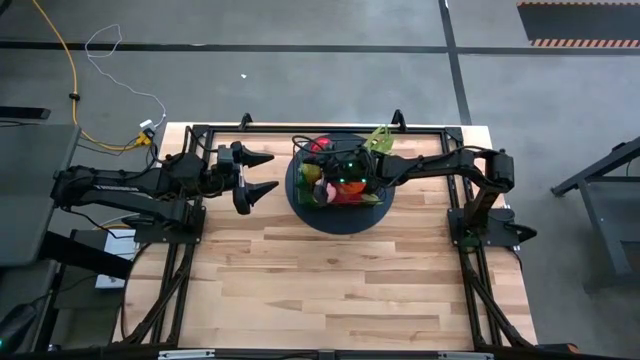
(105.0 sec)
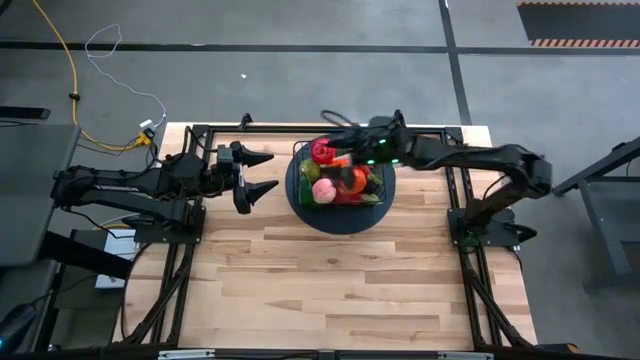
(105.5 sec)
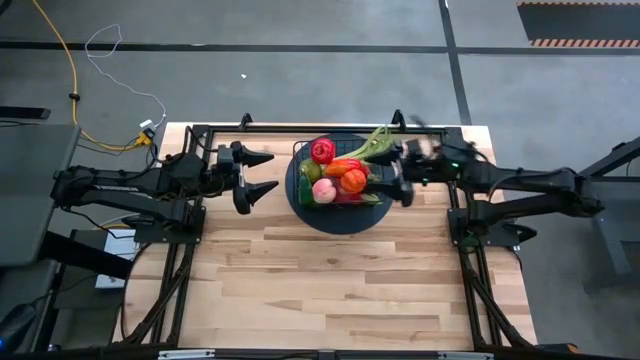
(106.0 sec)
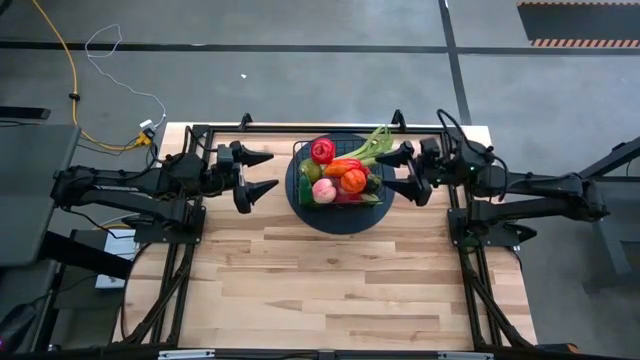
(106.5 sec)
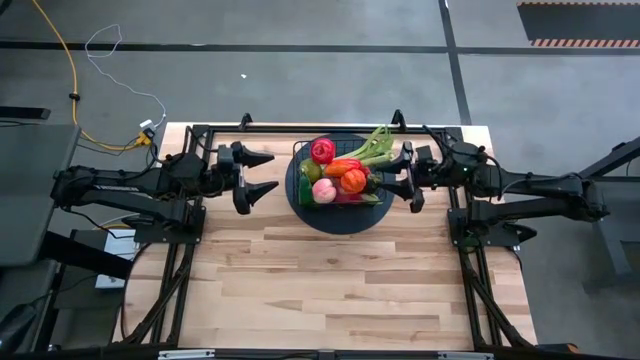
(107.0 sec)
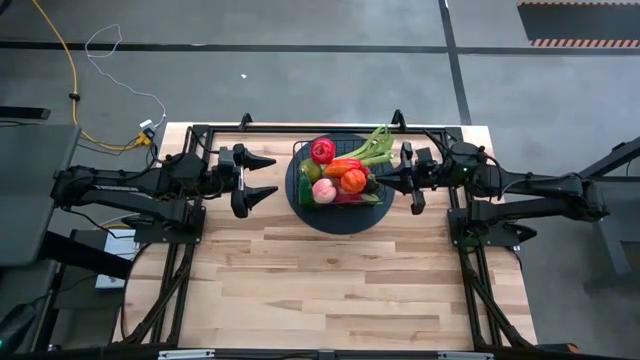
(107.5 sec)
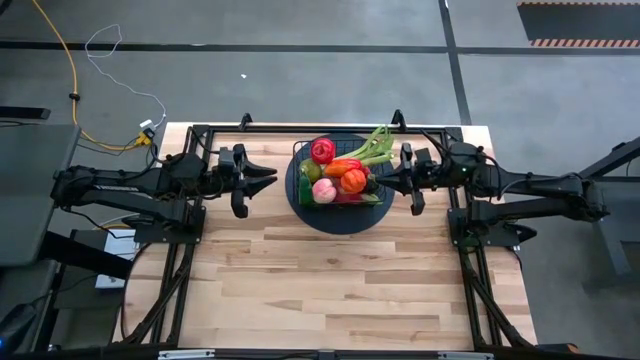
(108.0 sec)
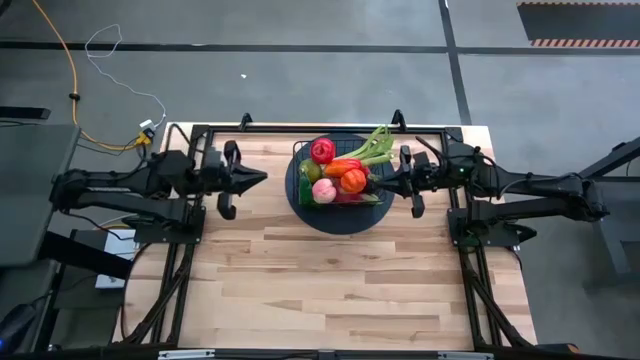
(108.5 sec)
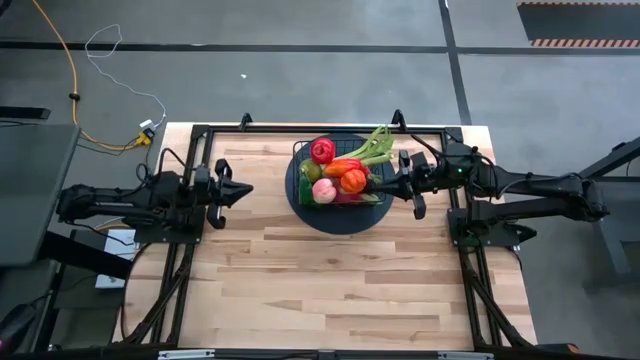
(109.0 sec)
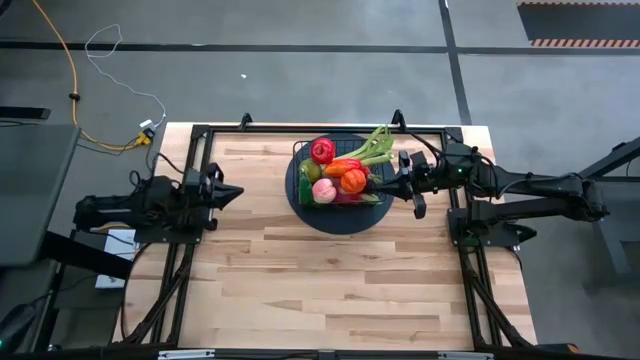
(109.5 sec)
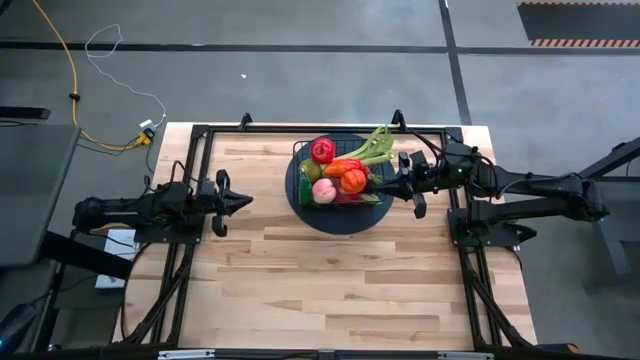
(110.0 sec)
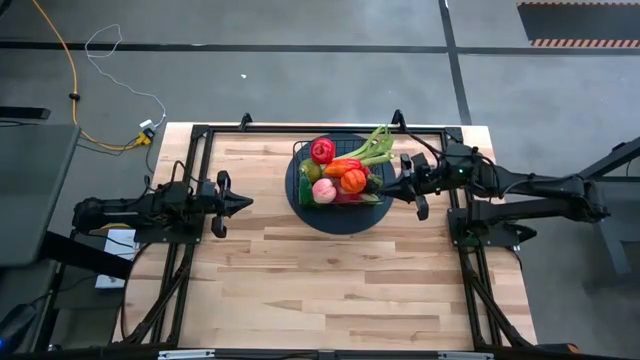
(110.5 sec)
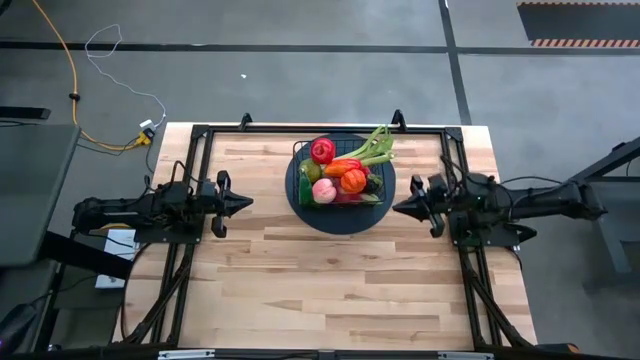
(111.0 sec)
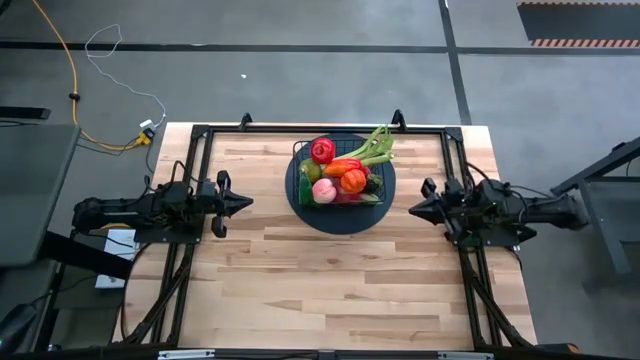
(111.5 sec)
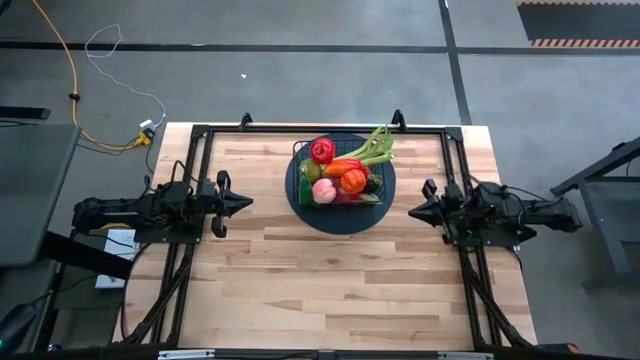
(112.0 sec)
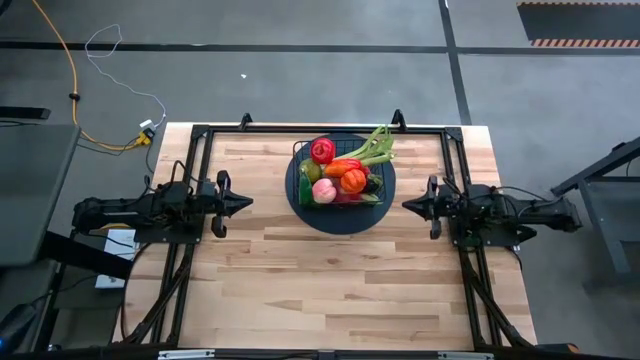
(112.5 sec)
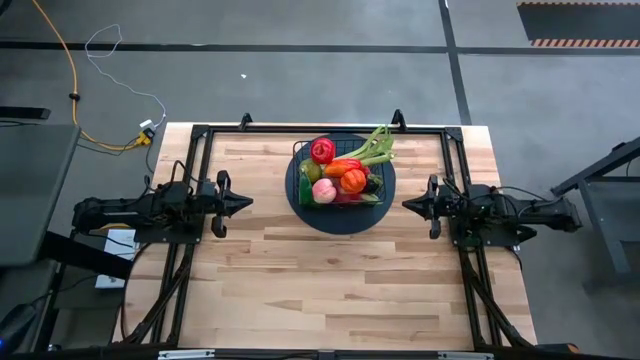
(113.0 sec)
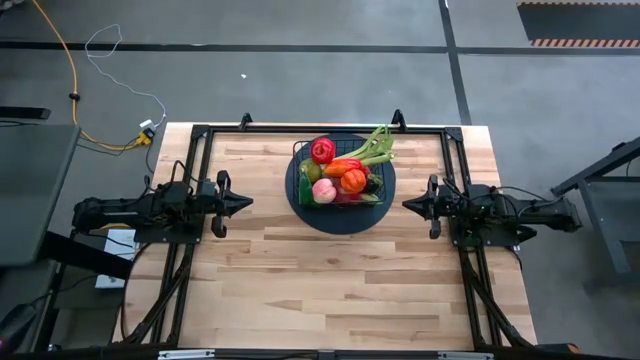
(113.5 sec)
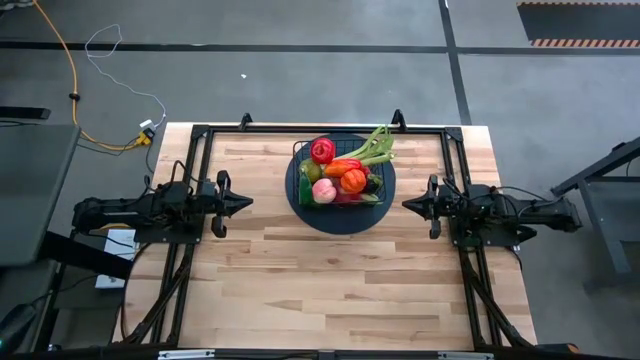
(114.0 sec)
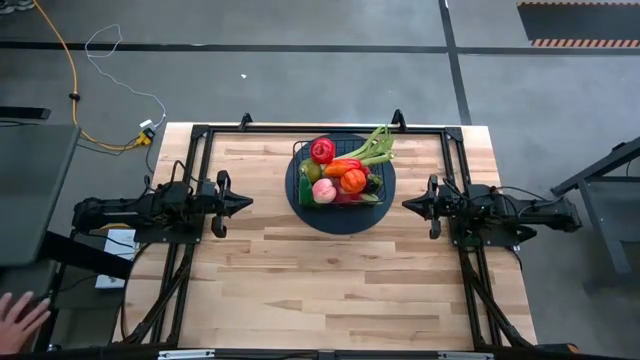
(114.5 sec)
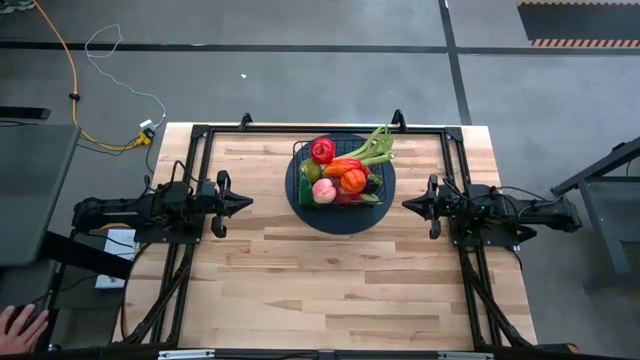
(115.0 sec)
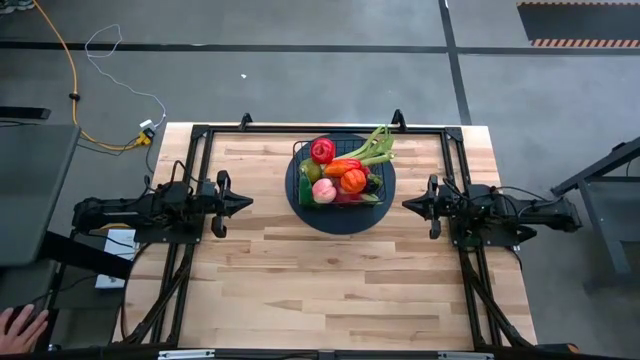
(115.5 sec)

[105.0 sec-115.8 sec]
Task: Build produce basket
Return to home position

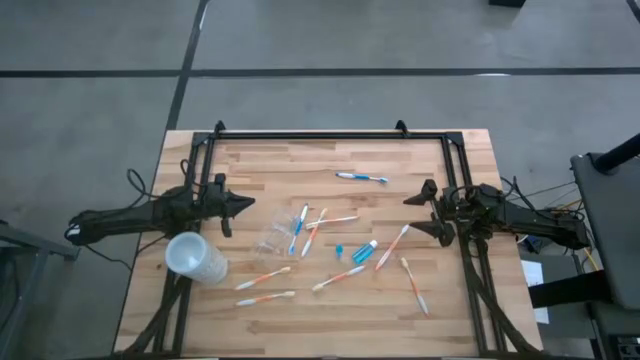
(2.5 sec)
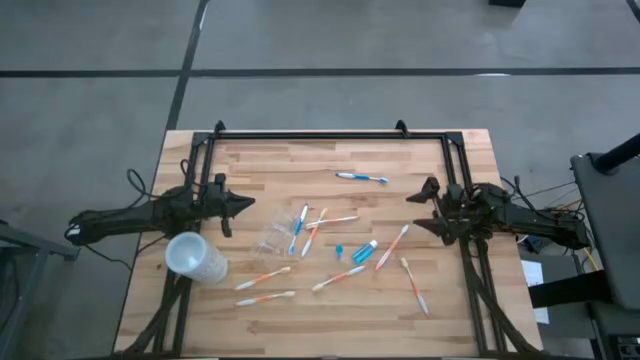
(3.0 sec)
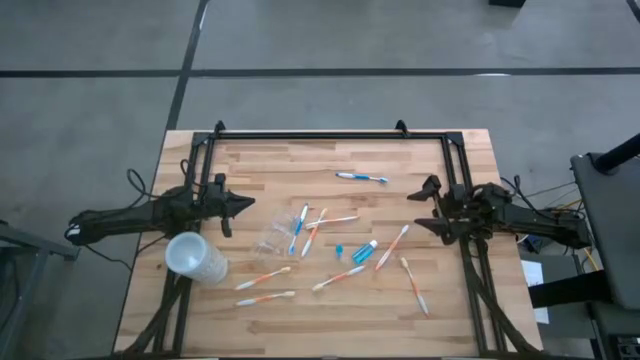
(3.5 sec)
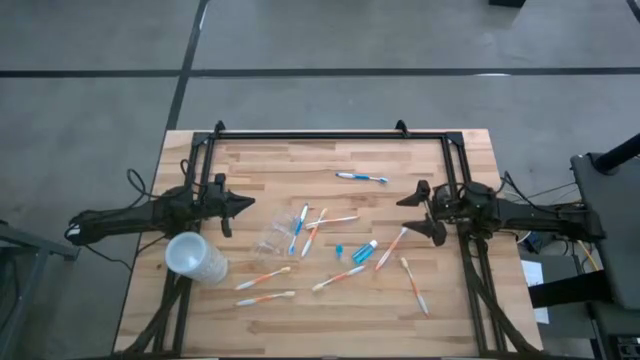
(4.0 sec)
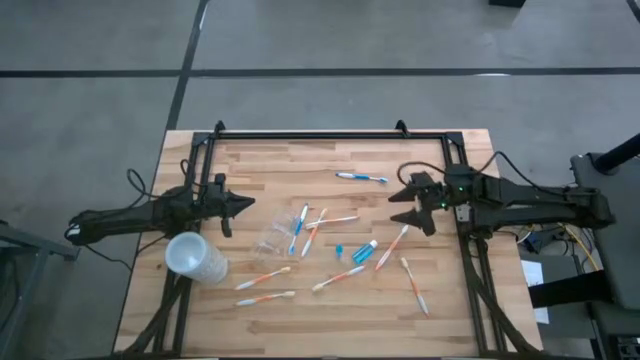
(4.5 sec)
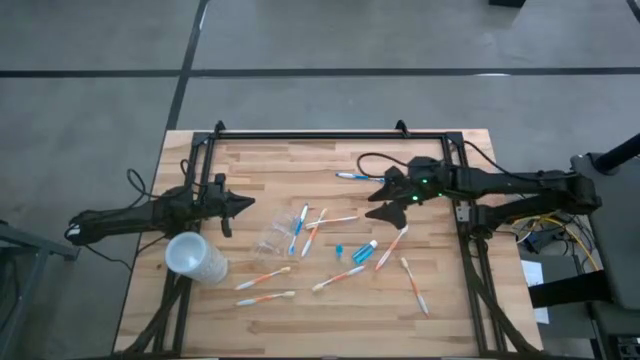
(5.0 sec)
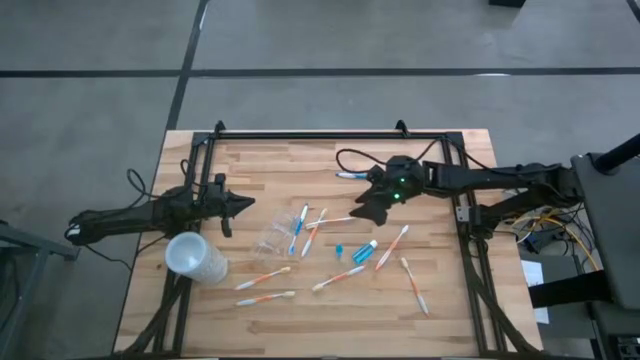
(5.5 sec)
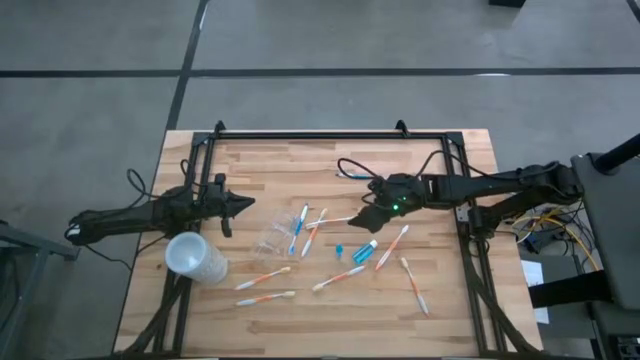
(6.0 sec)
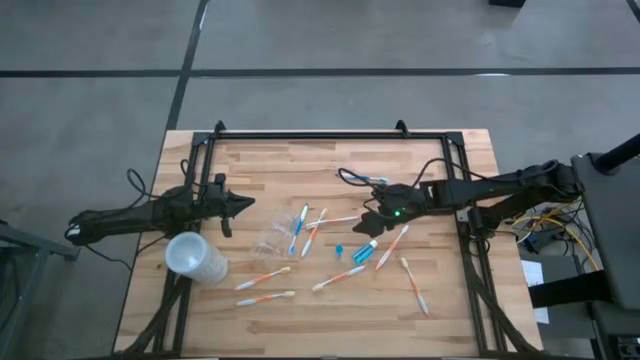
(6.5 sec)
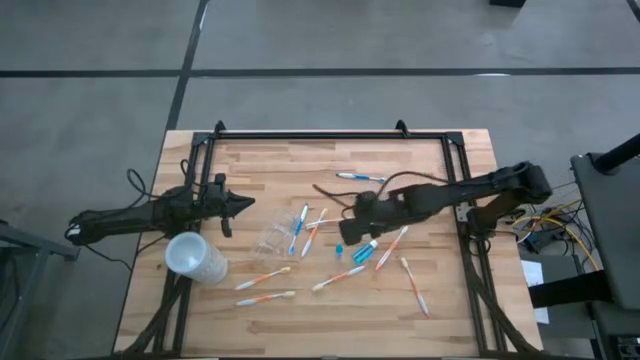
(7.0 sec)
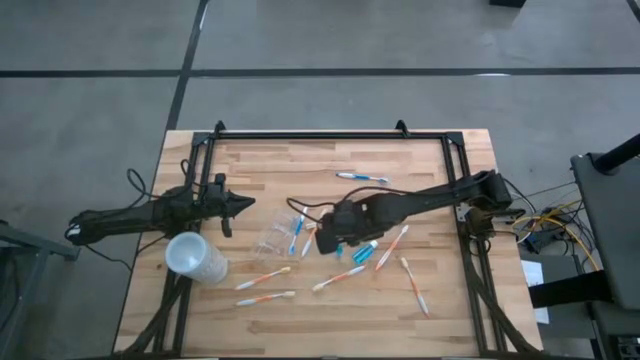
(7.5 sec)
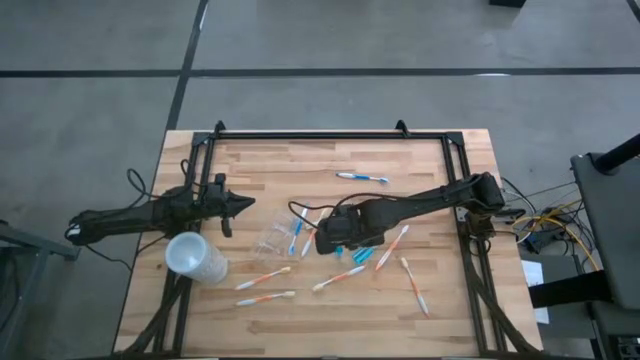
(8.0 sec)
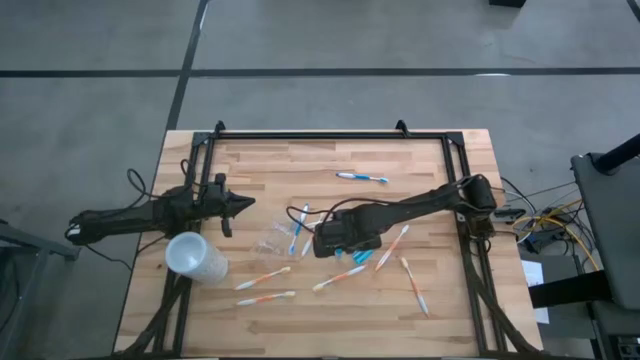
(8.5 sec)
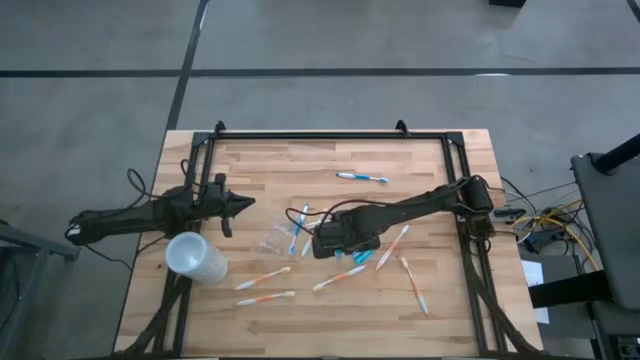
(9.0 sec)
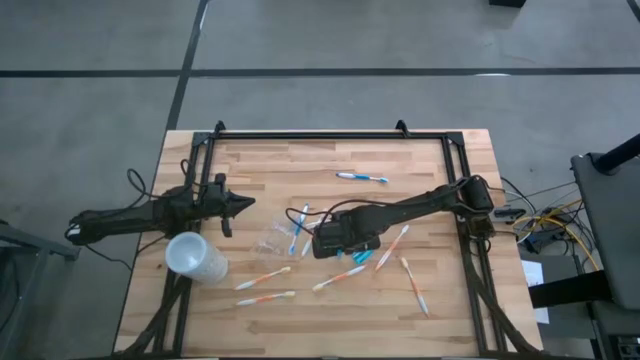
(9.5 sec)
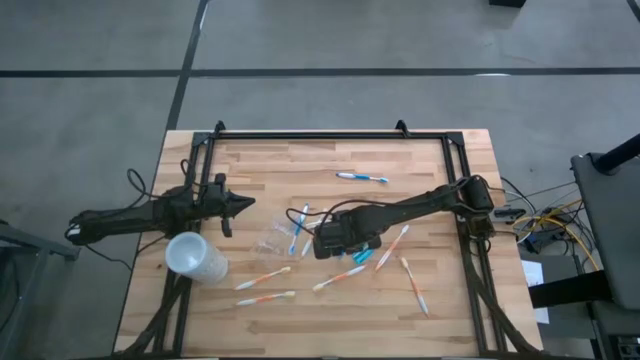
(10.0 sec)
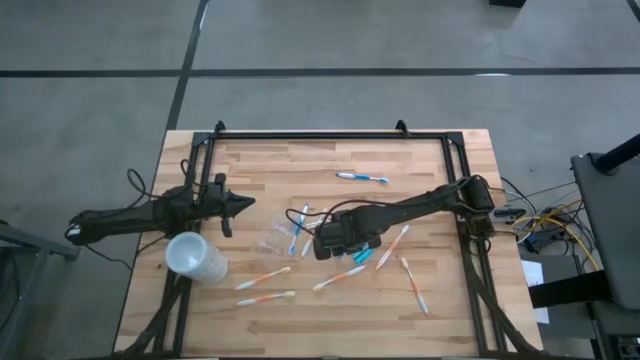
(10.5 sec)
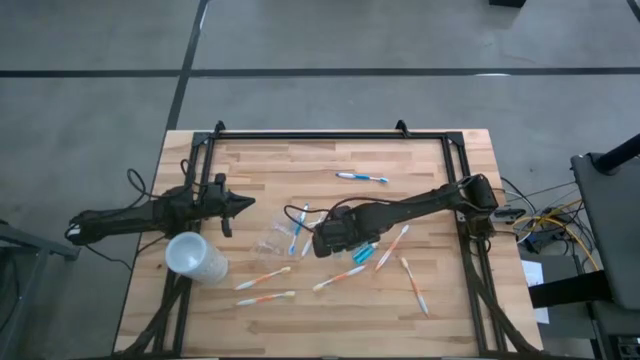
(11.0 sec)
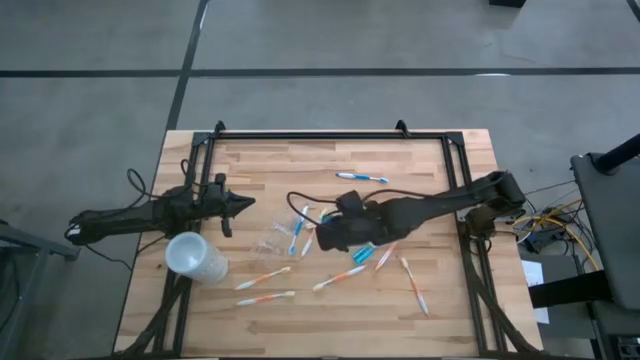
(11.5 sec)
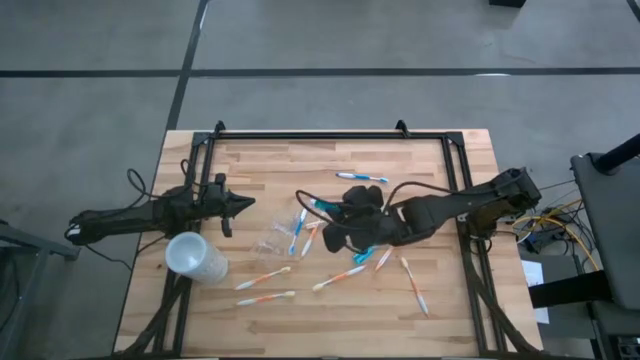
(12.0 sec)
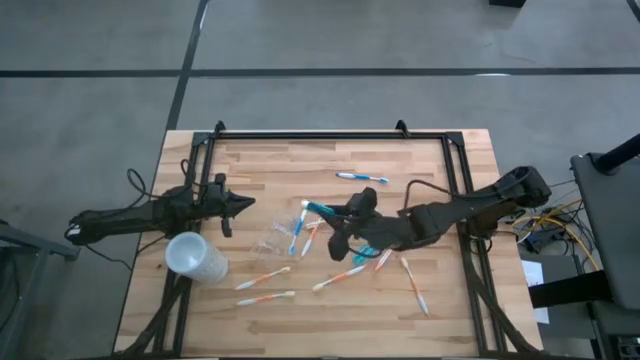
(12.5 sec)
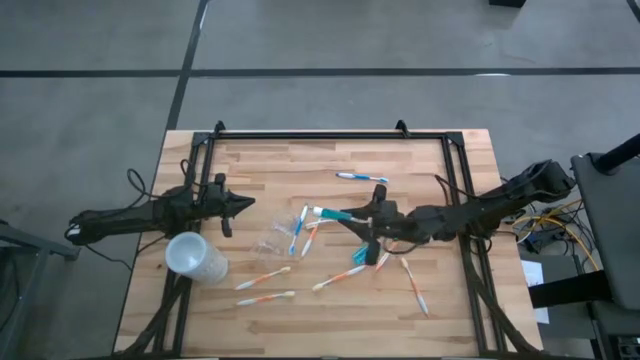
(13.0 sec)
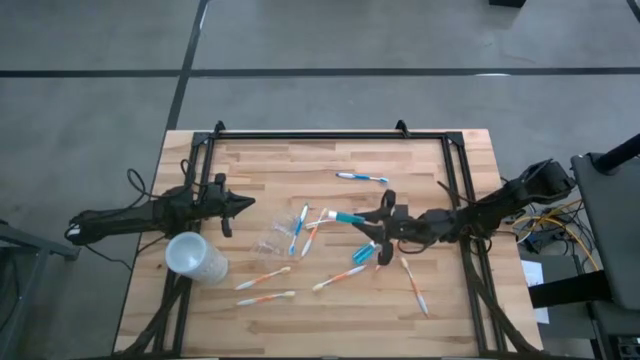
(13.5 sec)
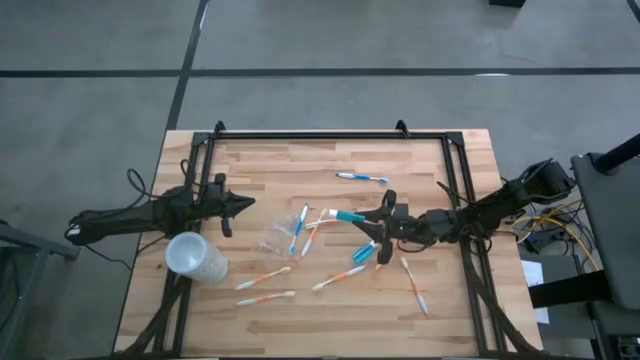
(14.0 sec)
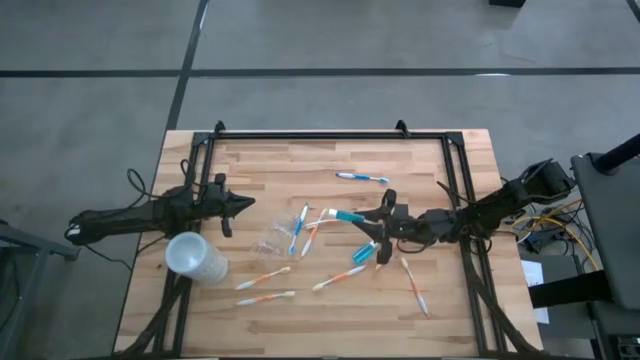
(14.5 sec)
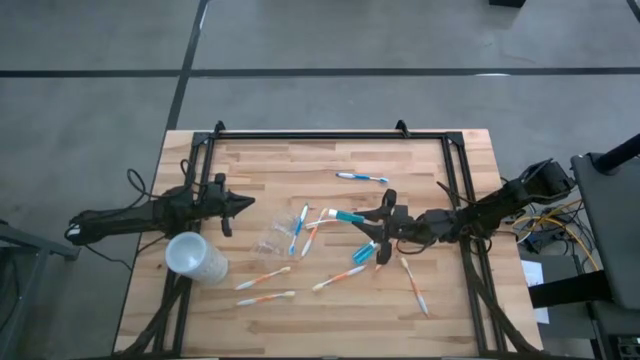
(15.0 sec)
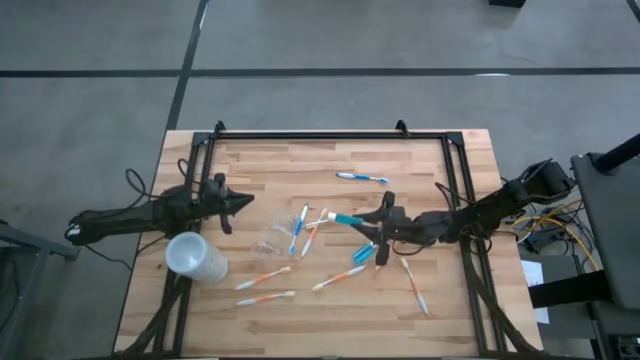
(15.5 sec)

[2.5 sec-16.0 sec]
Task: Pick & Place toothbrushing station
Put the left mouthwash bottle into the transparent organizer
